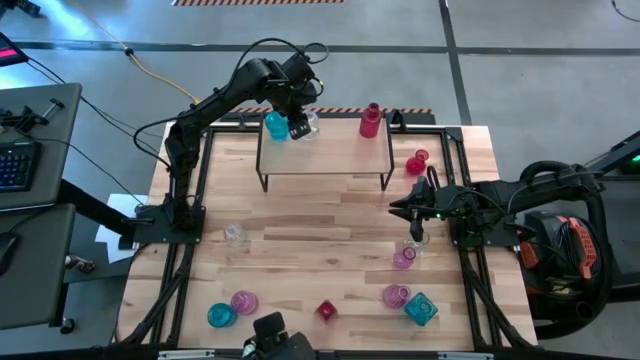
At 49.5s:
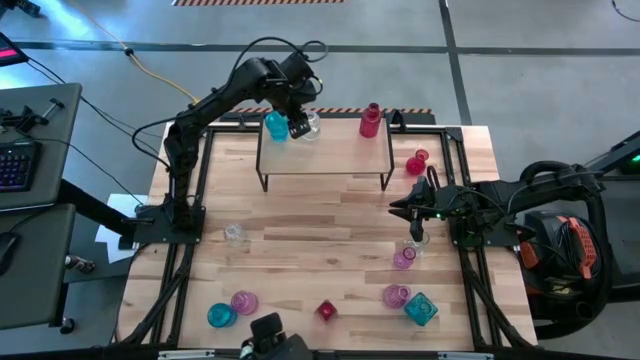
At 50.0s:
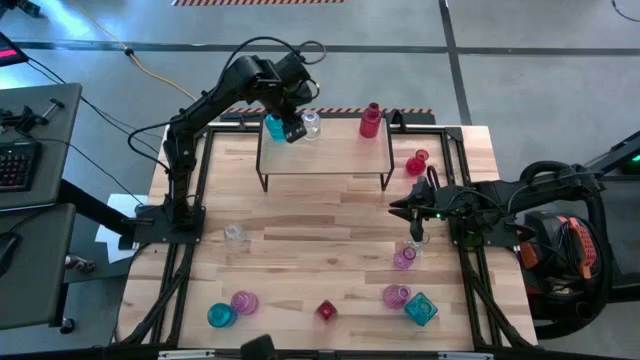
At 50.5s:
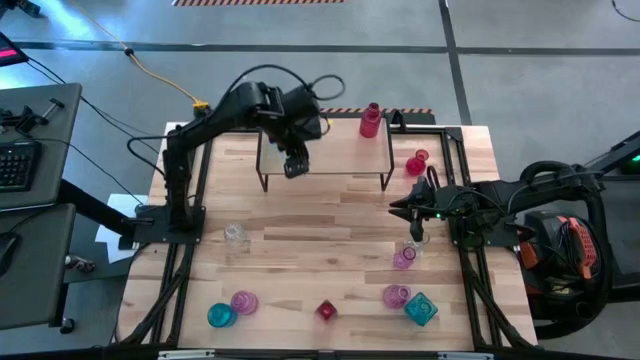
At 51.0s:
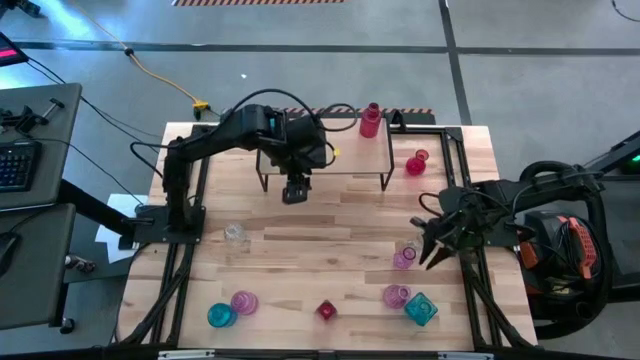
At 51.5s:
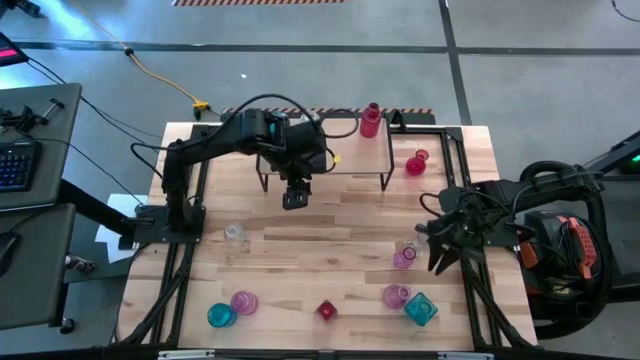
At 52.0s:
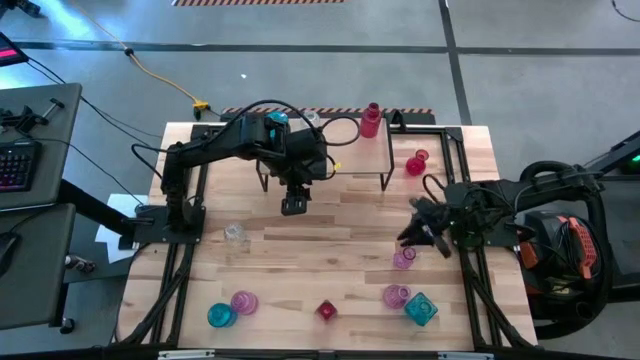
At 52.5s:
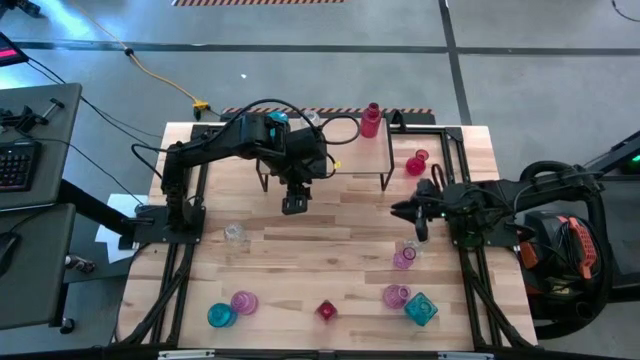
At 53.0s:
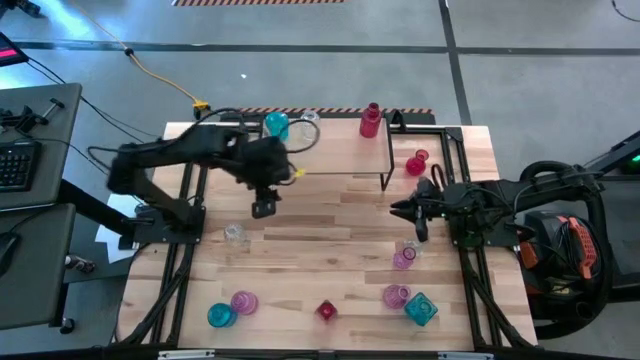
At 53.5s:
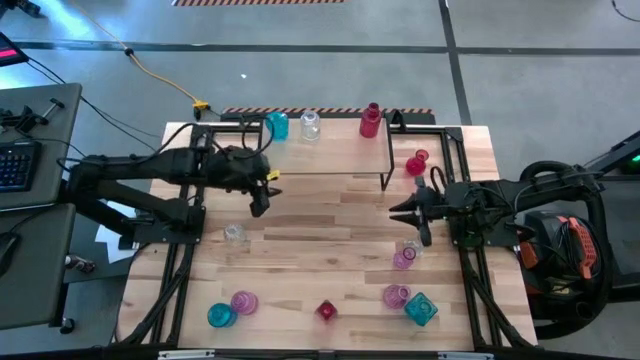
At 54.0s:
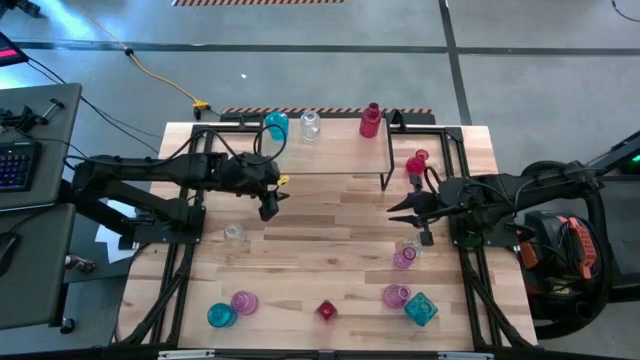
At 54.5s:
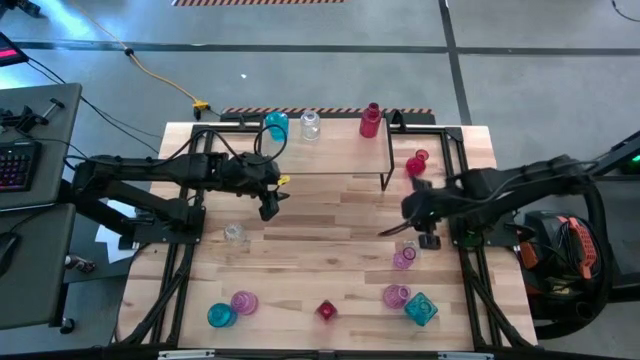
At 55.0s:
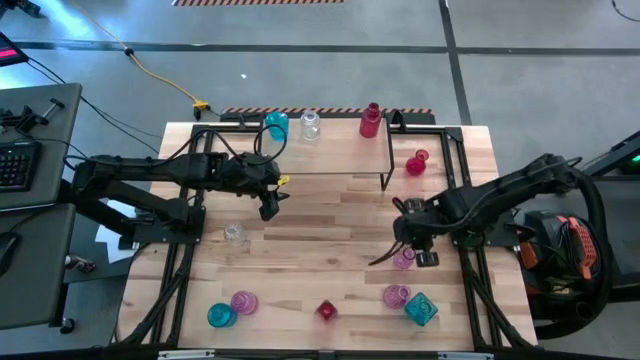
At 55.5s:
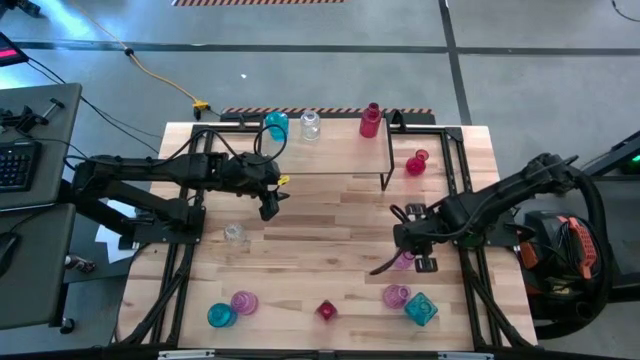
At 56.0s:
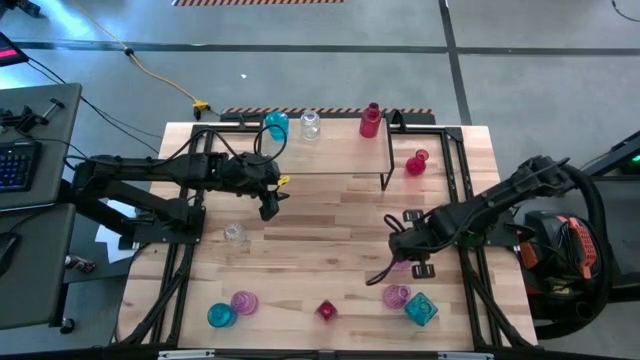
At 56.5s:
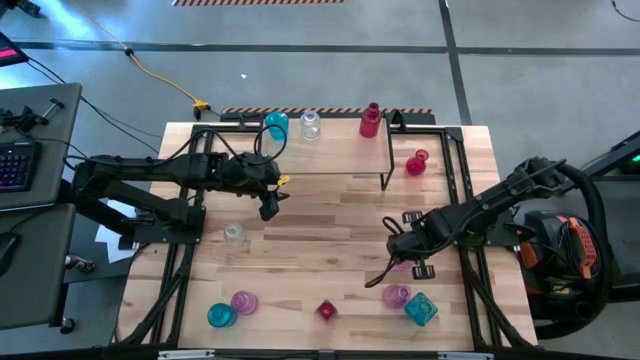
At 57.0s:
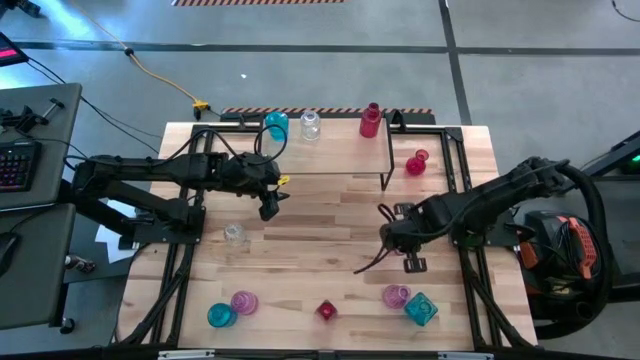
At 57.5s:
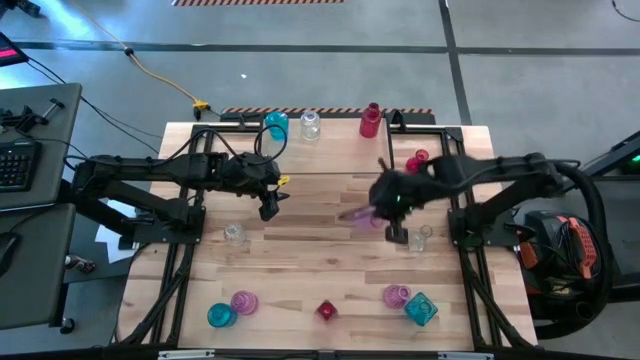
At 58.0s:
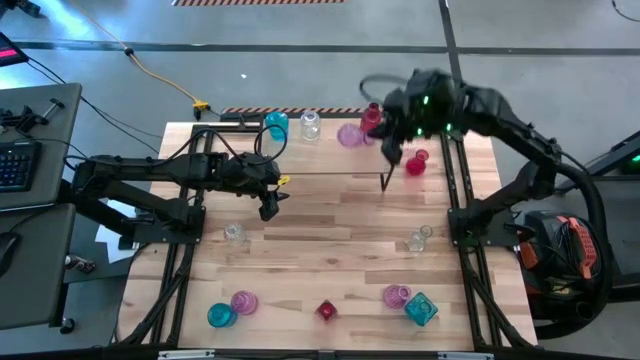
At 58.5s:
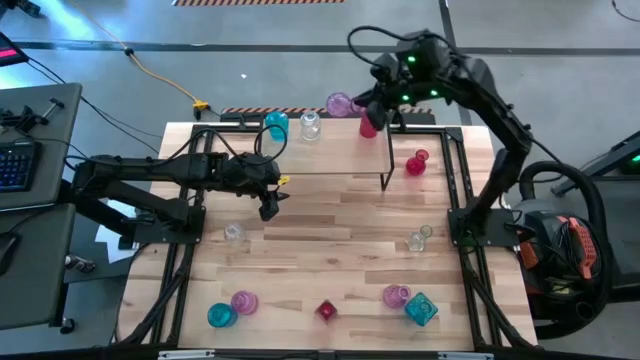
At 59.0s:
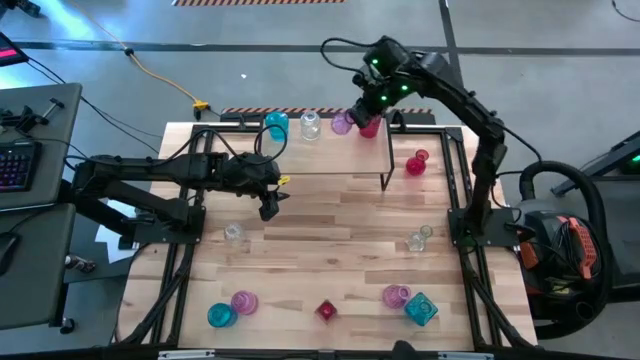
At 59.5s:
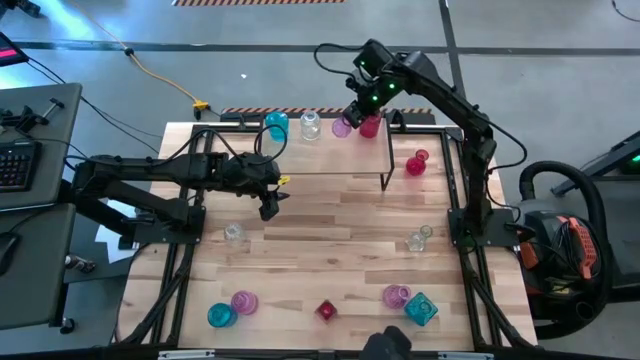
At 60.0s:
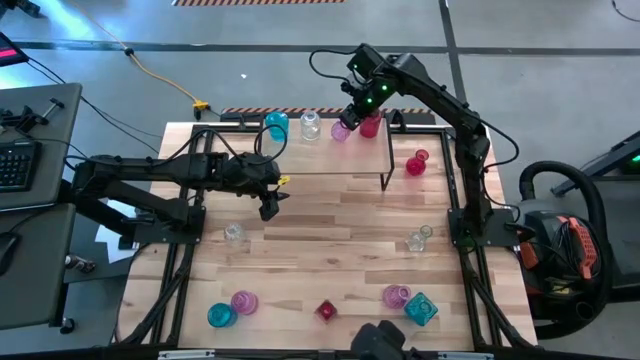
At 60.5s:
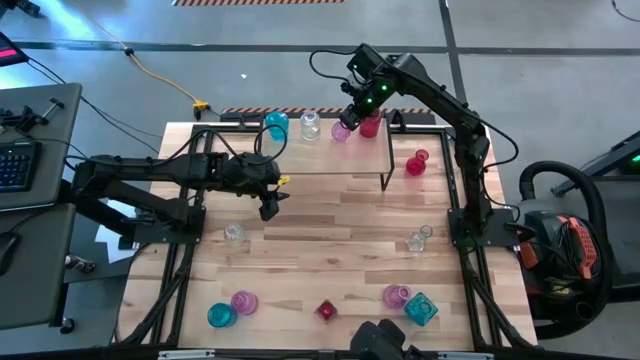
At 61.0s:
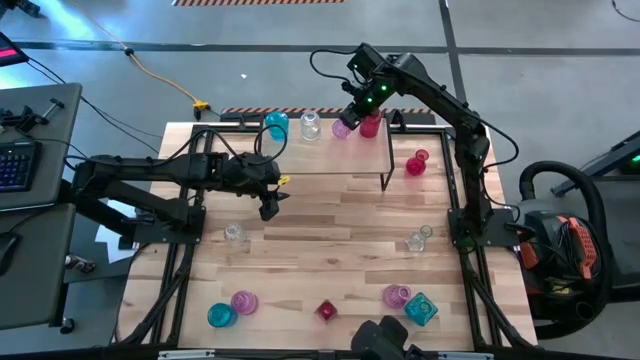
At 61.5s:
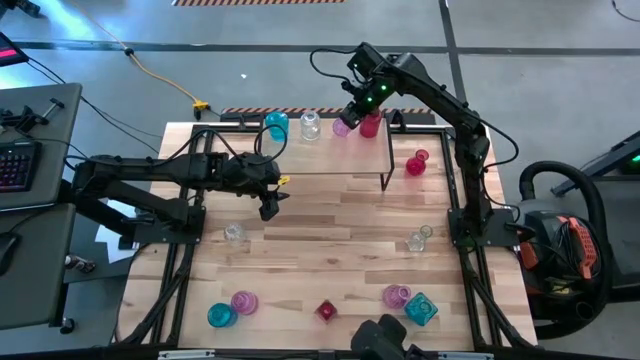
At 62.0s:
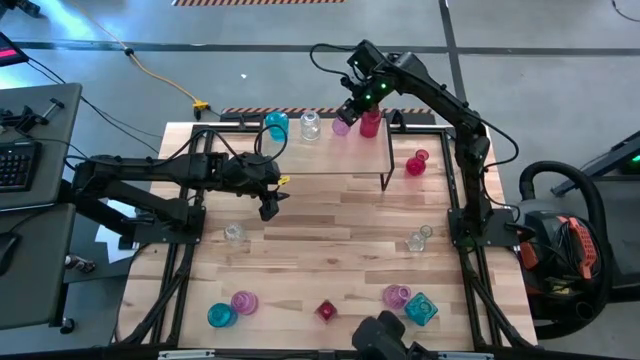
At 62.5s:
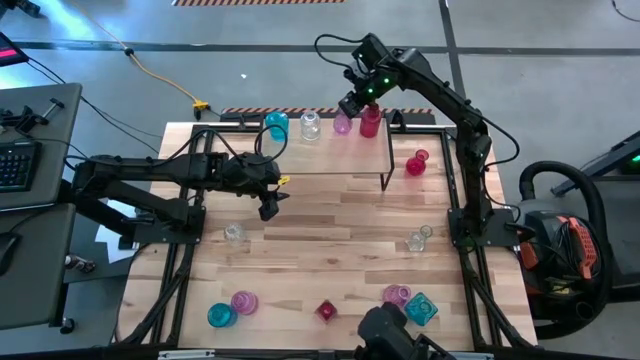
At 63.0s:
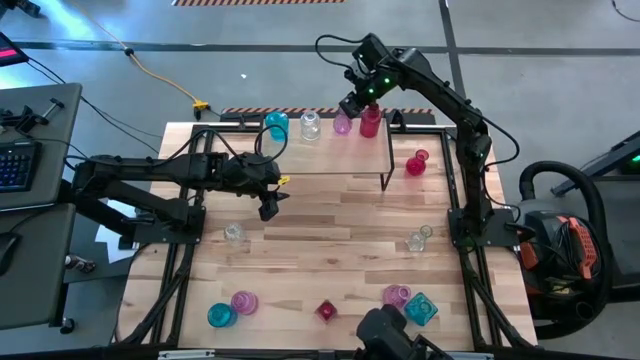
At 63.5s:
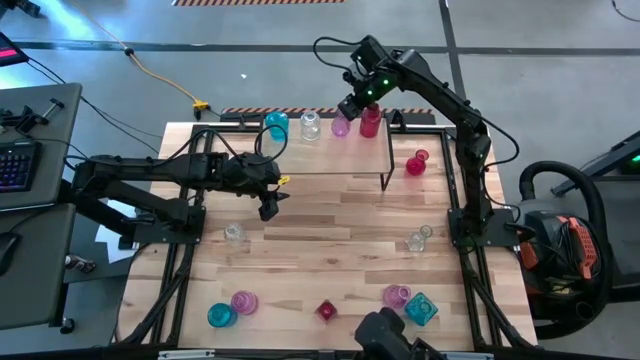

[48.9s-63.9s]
Task: sort vases onto shelf
Put the top right violet vase on the shelf

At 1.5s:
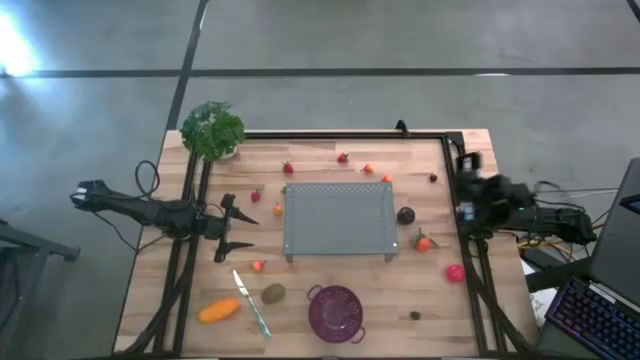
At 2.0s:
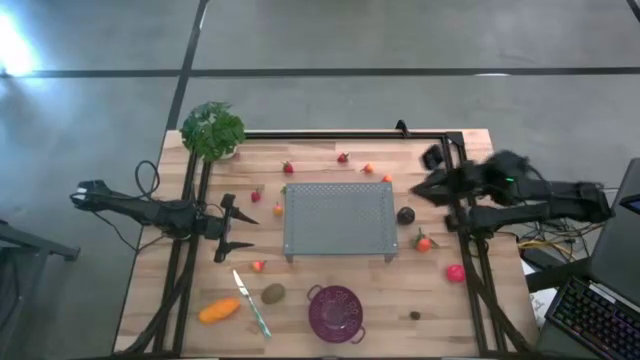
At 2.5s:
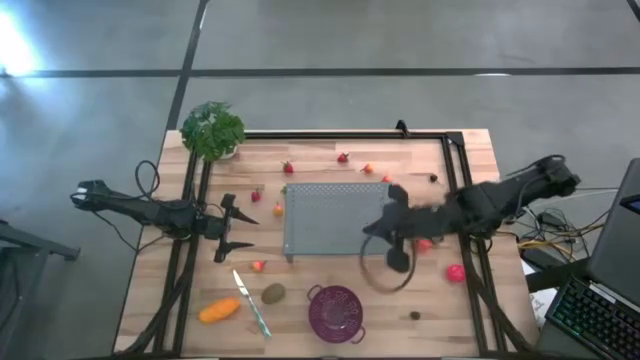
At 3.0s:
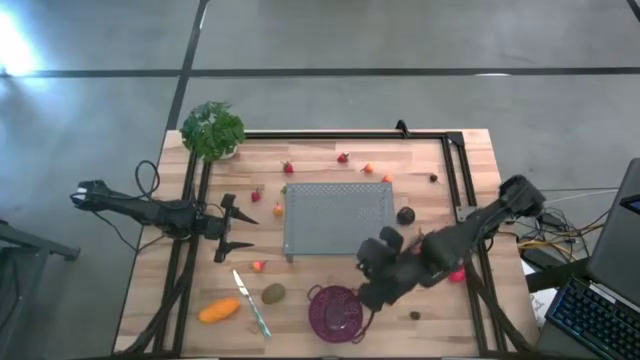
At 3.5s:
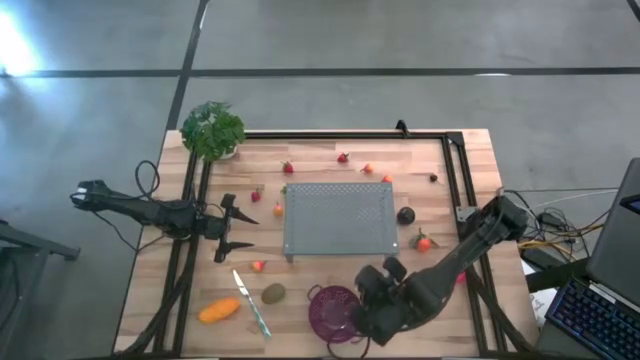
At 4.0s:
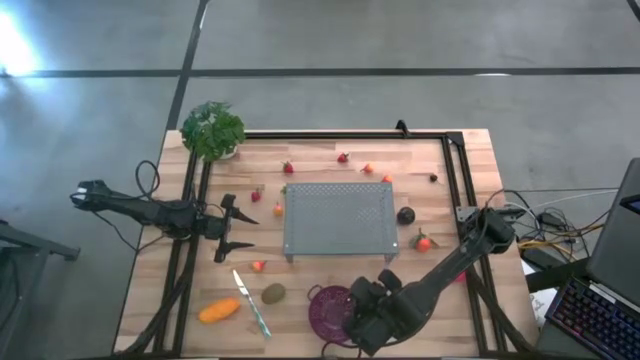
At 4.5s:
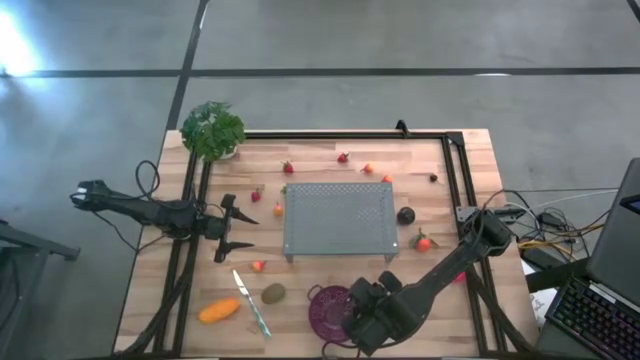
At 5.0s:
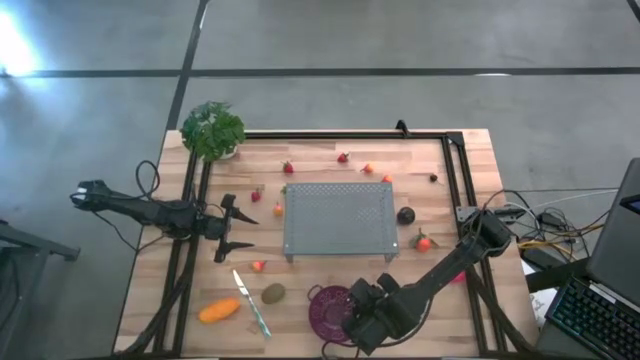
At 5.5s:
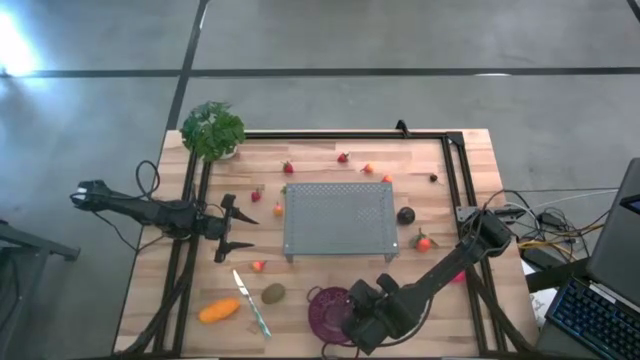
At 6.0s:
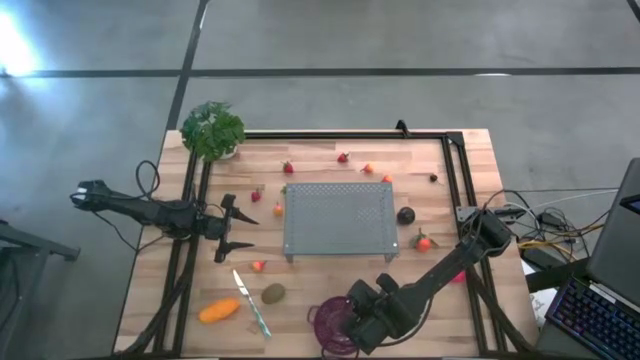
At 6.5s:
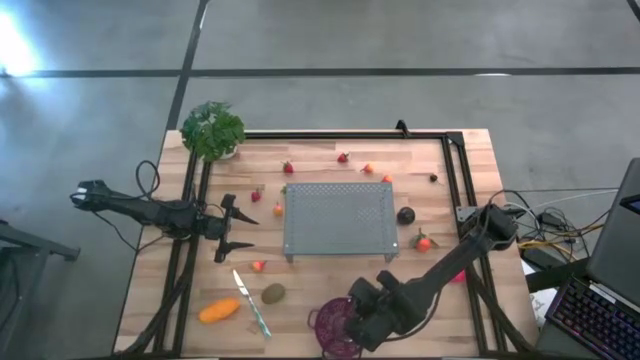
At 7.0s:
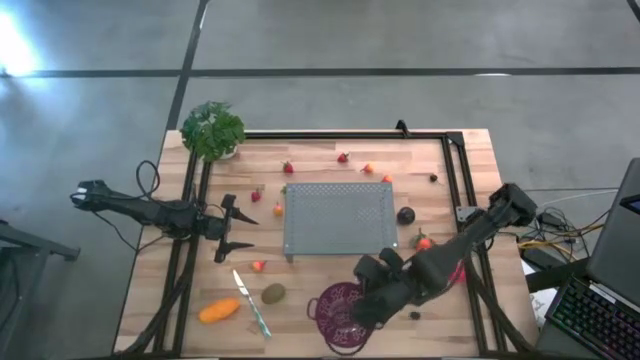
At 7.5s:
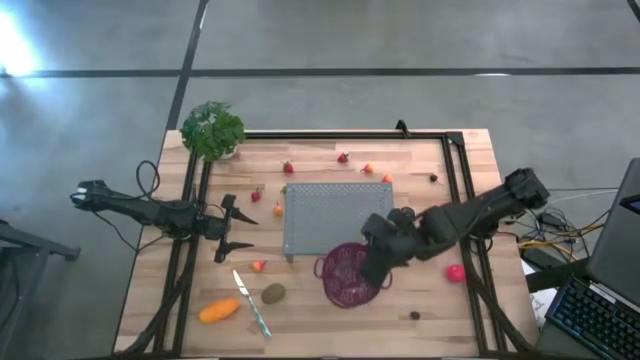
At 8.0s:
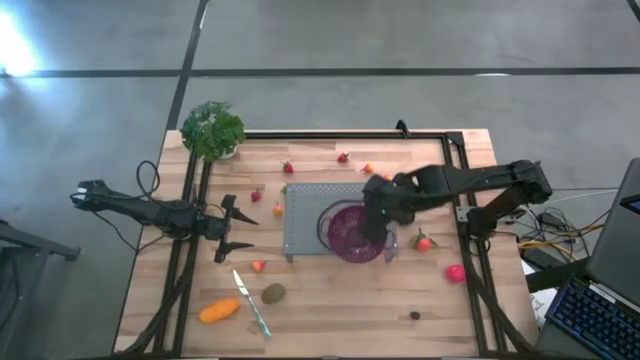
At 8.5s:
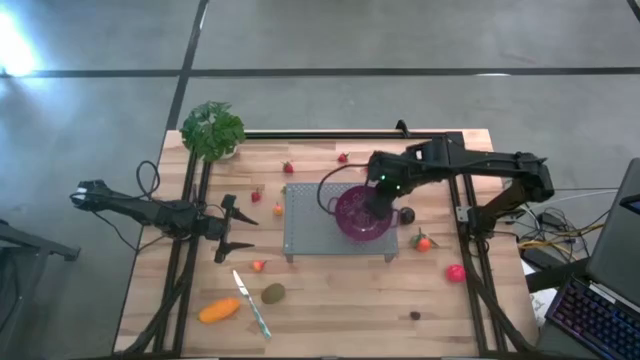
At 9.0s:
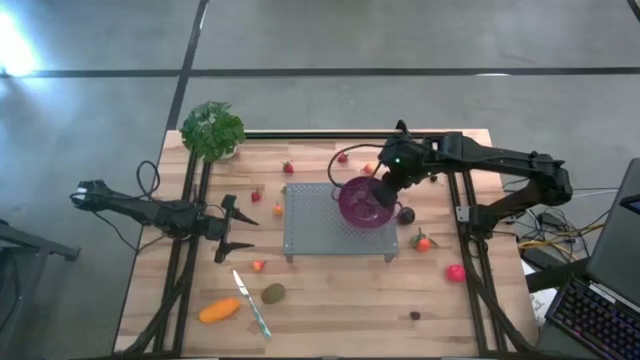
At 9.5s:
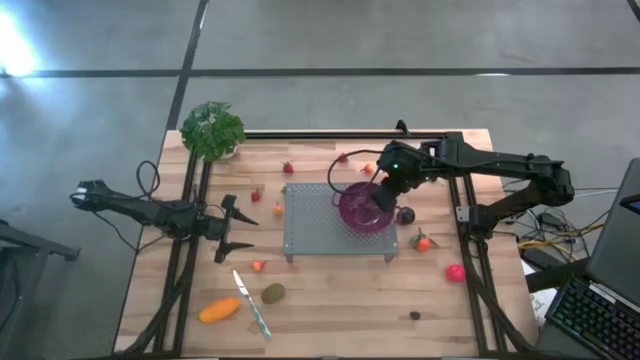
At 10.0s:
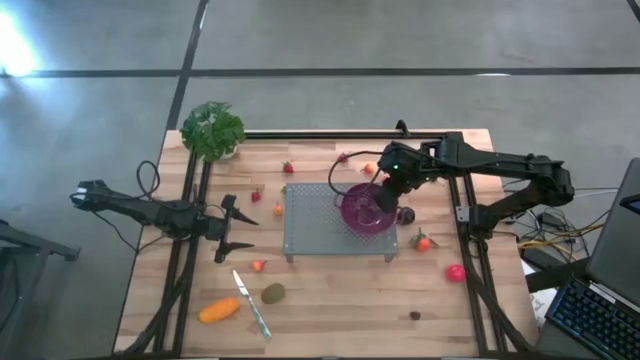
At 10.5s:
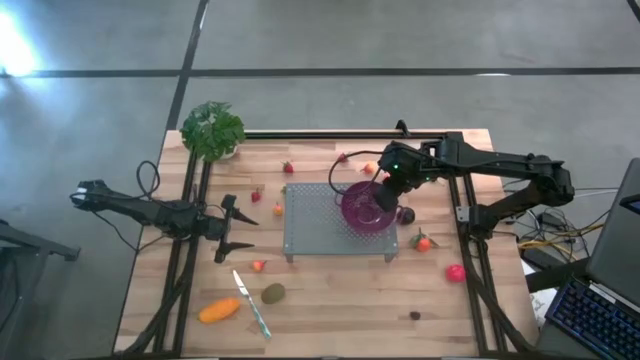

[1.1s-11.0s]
Task: Pick & Place Fruit
Put the purple strainer bowl on the shelf
